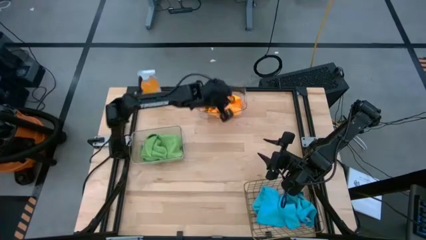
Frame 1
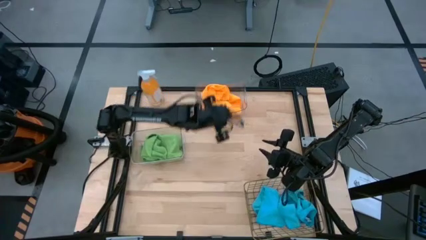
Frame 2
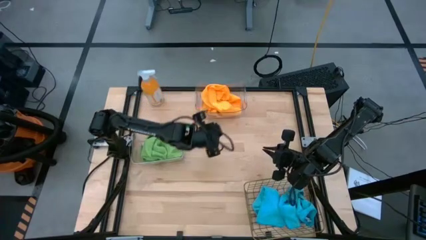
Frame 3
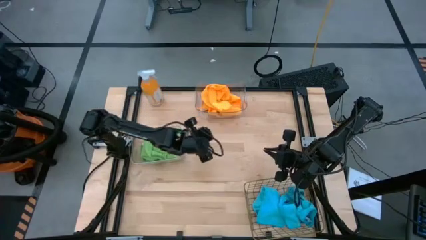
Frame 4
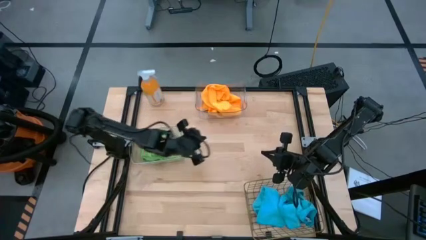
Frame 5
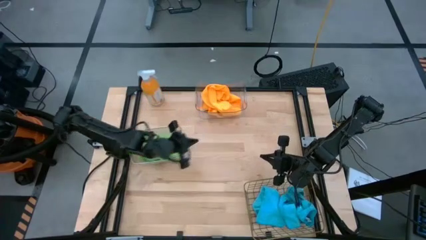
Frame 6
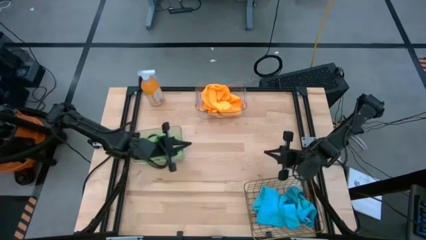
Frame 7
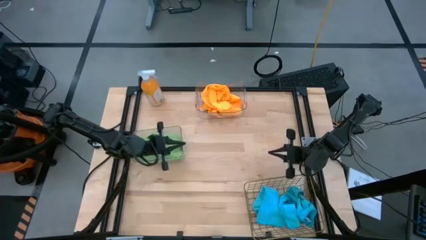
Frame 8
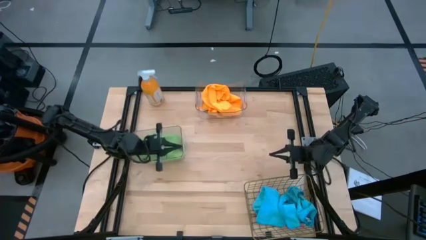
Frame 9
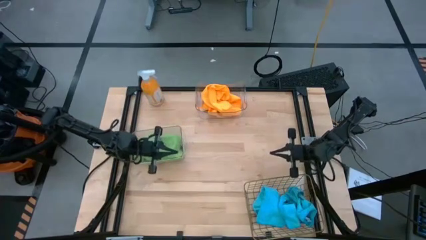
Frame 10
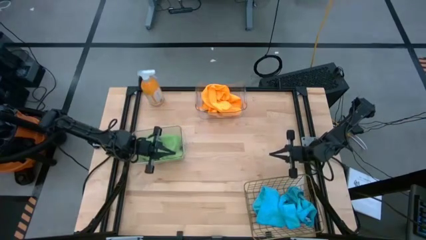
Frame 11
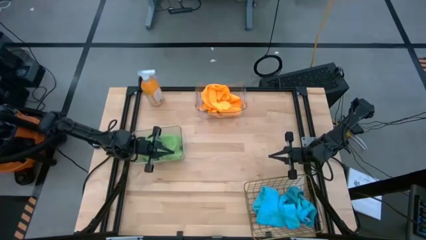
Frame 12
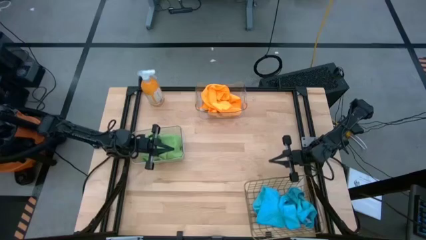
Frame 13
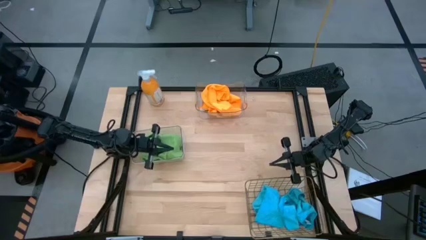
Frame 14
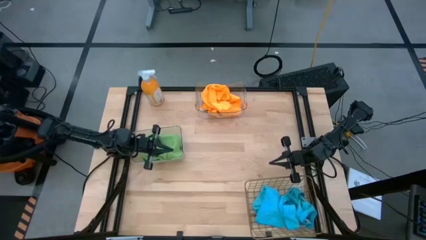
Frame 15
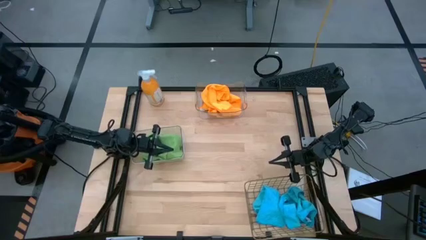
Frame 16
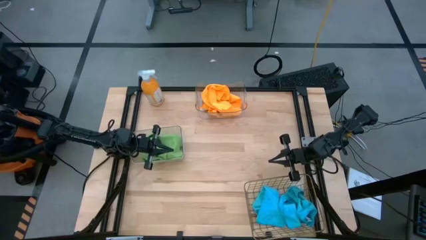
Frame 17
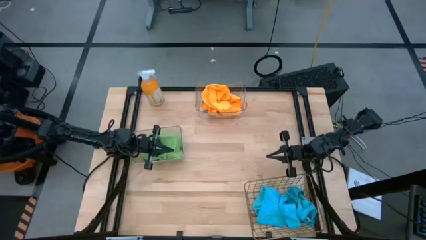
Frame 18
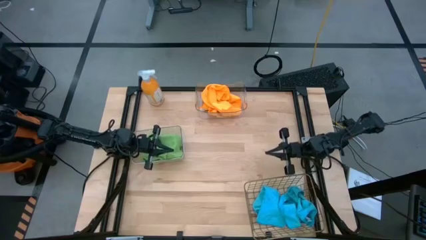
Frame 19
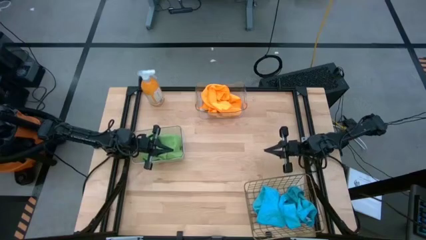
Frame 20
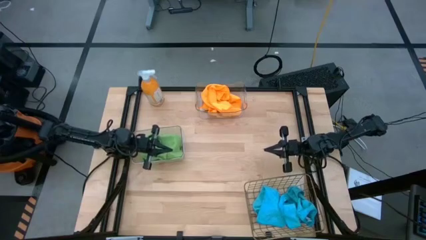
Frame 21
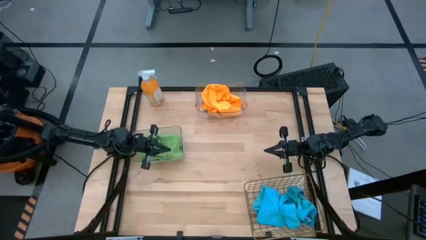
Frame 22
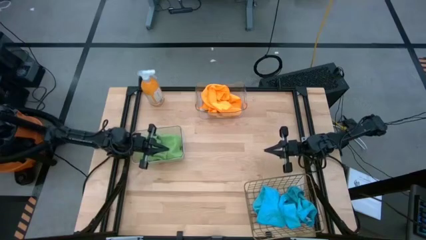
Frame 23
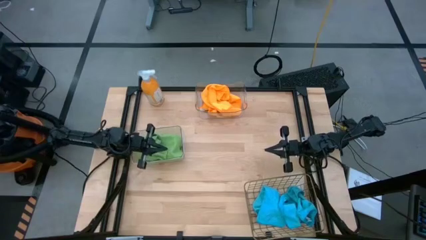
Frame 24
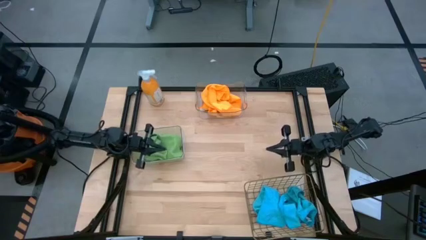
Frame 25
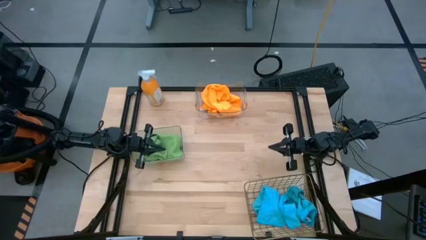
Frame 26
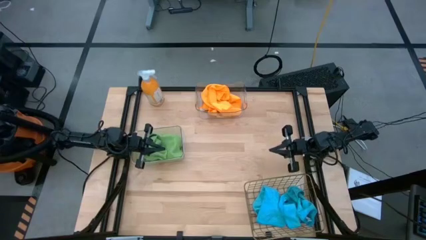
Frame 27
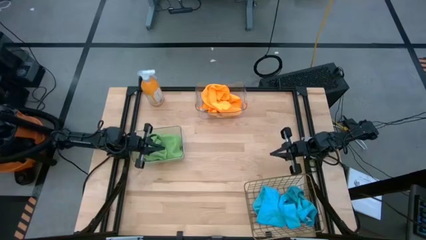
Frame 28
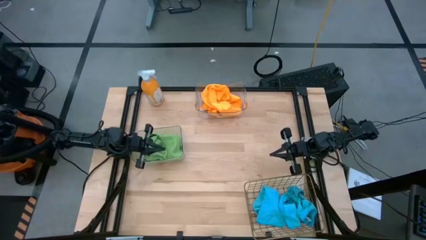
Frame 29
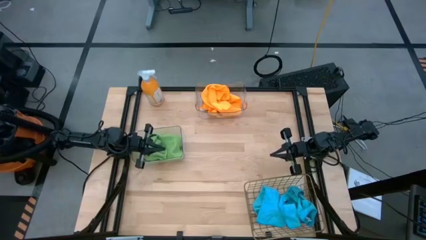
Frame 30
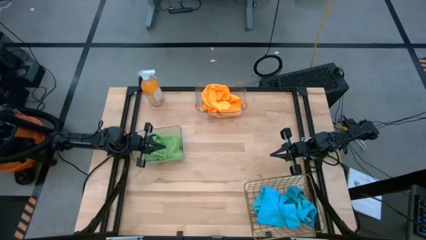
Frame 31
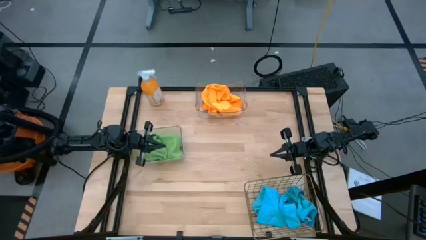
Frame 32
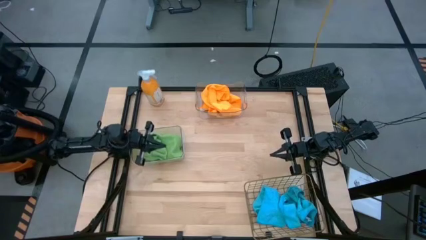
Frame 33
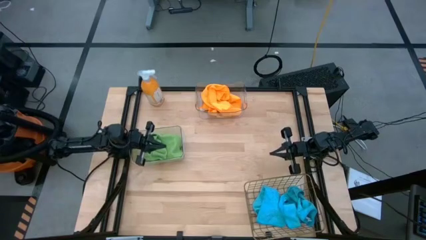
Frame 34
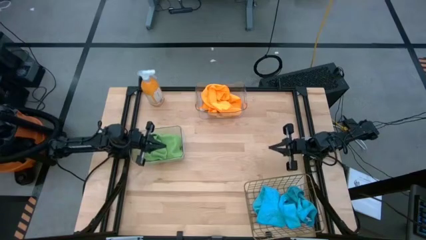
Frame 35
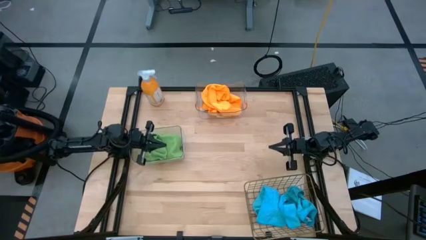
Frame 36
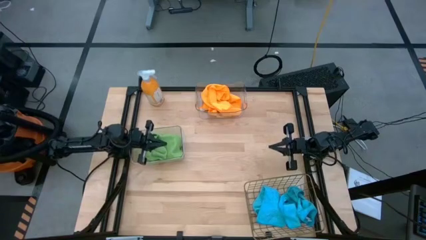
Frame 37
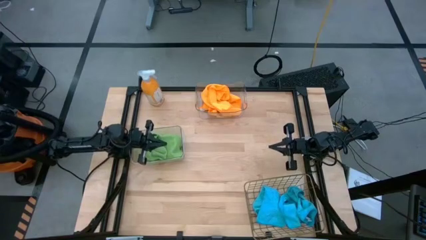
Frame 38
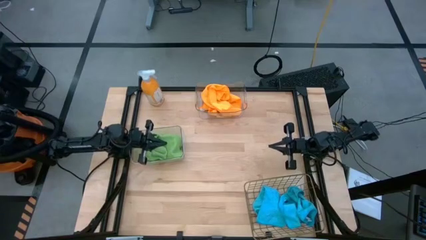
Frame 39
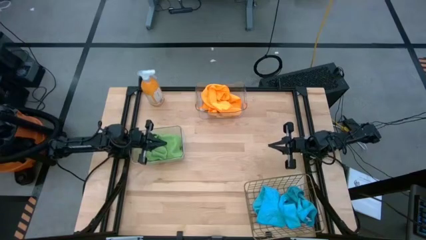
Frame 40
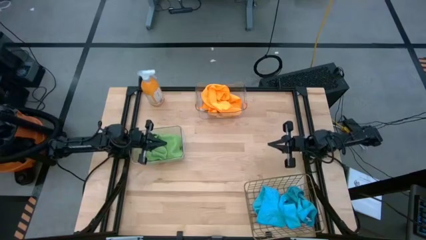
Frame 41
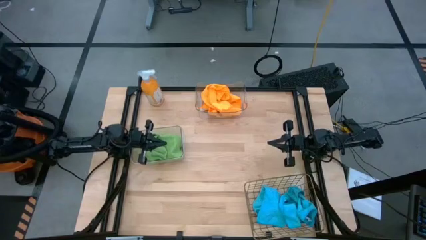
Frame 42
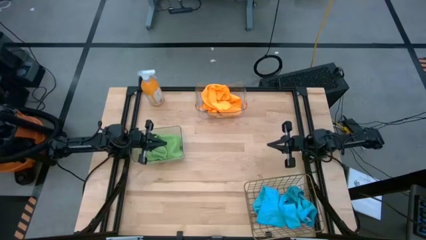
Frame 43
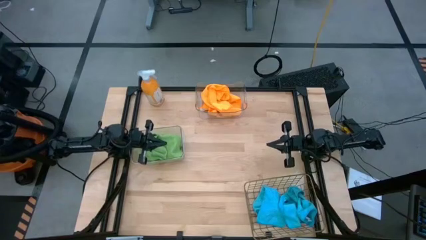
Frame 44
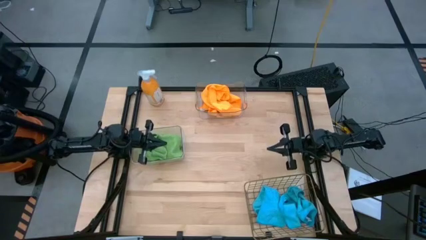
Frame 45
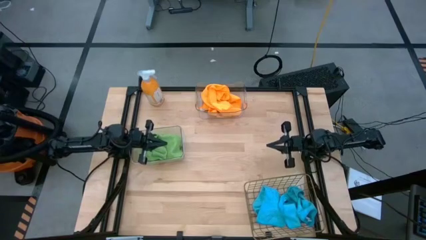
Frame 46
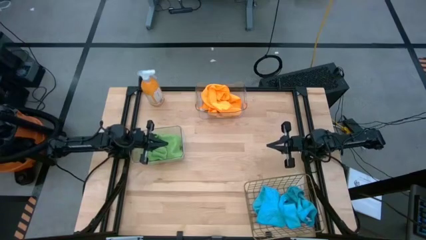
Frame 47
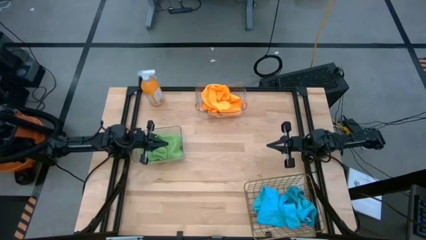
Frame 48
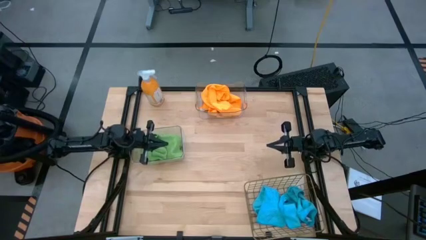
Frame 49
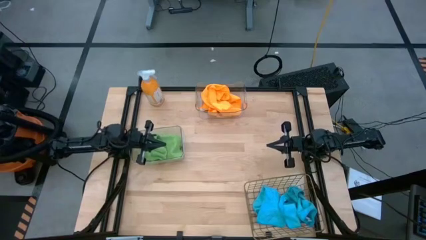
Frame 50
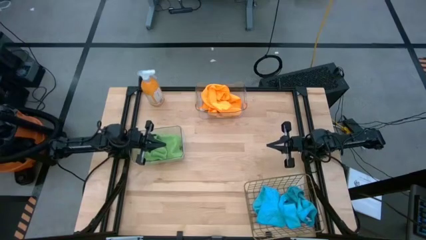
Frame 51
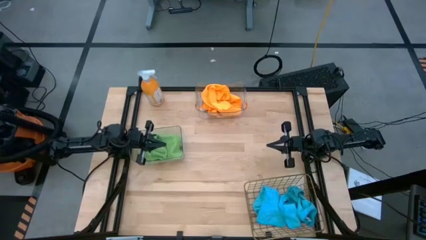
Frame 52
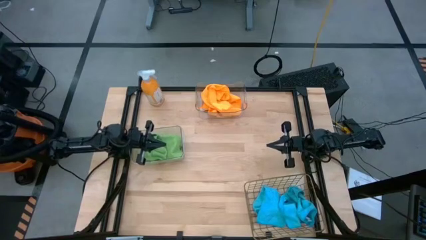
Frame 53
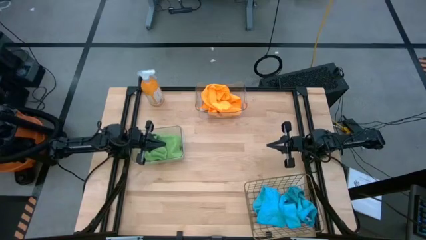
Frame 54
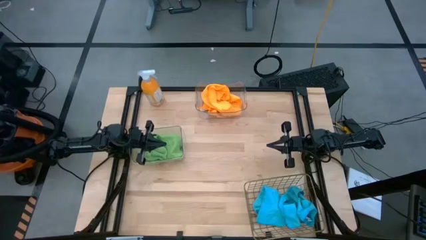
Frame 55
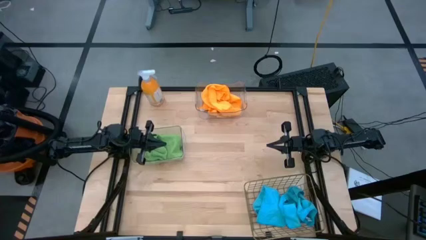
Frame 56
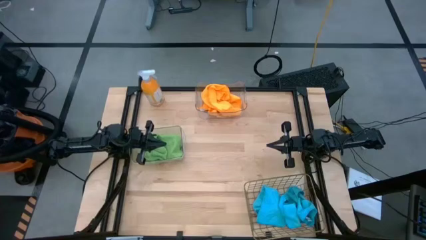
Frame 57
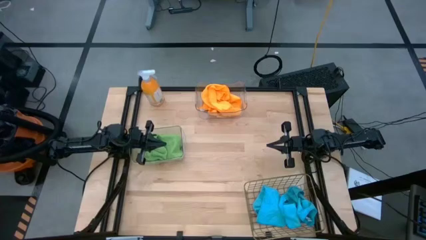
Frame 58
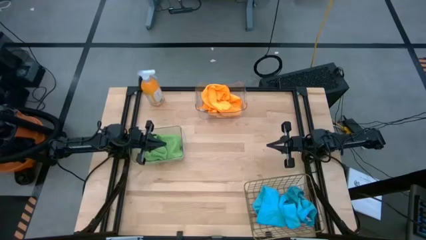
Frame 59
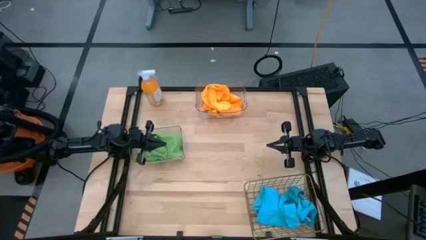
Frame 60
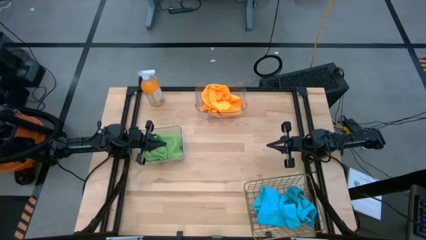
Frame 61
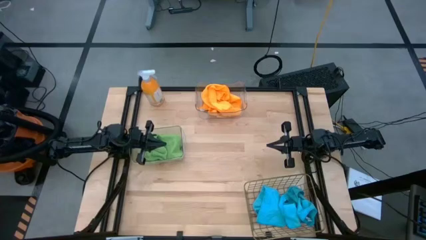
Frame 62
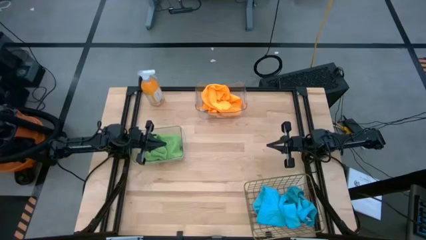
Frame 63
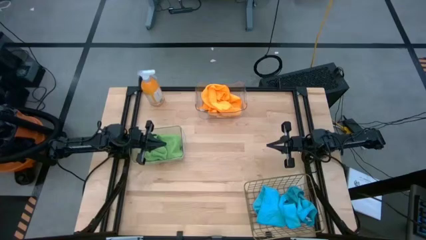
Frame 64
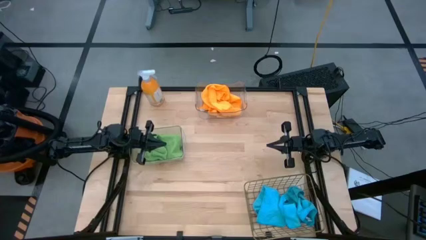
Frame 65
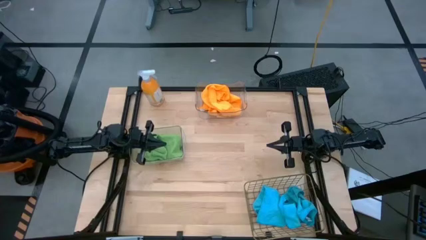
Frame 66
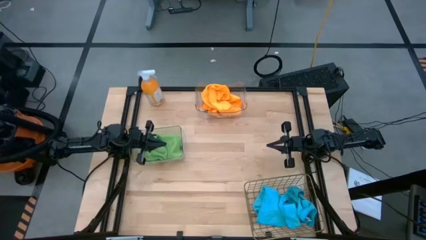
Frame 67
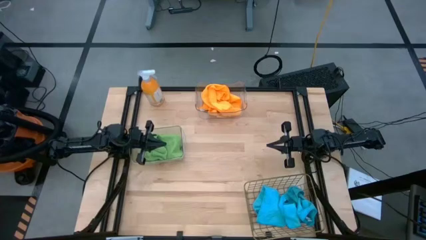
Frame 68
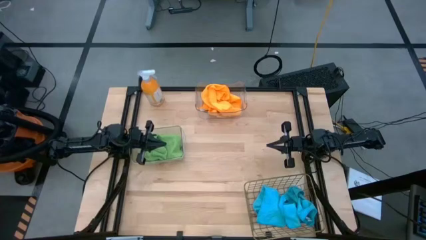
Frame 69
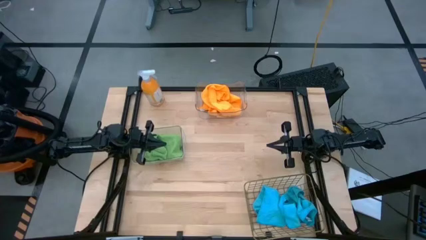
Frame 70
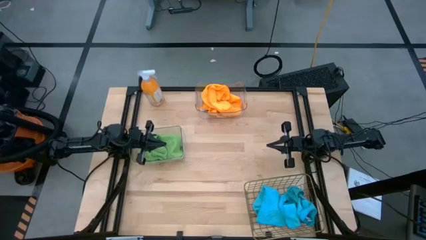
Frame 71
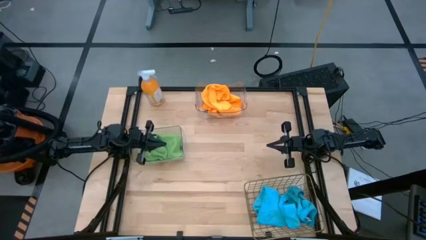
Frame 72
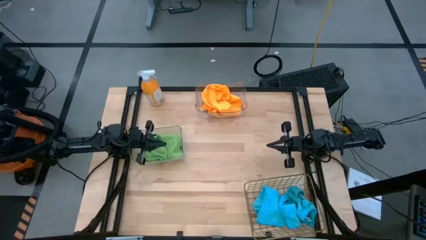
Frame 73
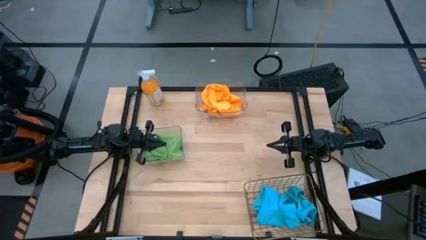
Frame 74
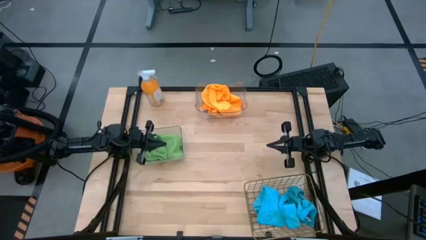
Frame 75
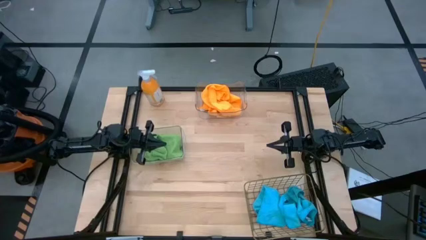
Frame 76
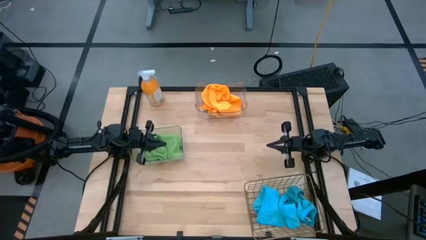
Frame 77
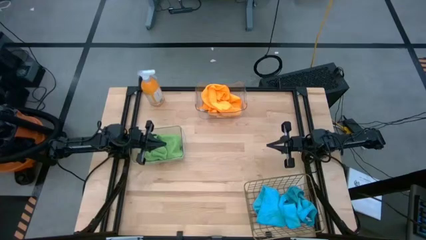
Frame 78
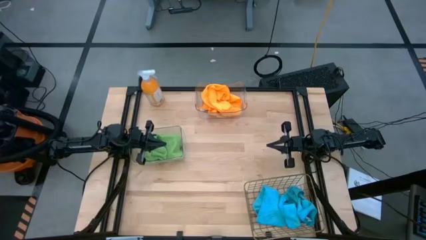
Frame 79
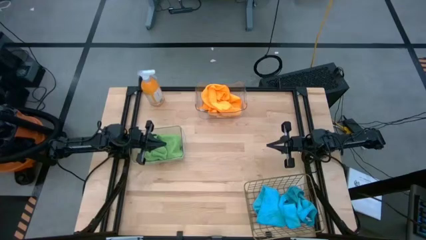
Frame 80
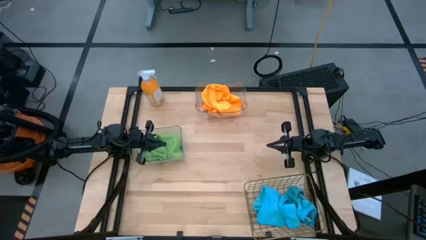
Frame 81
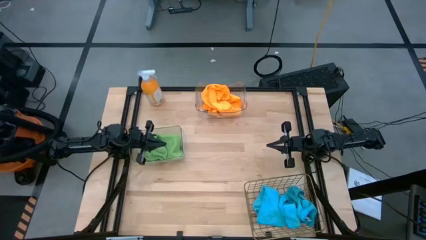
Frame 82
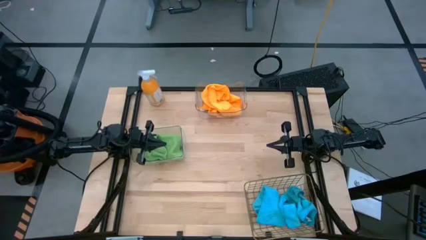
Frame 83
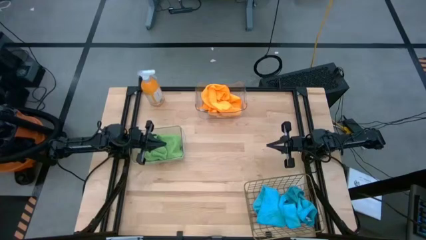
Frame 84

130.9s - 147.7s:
Task: Sort microfiber towel by color & place in baskets
Return to Home Position

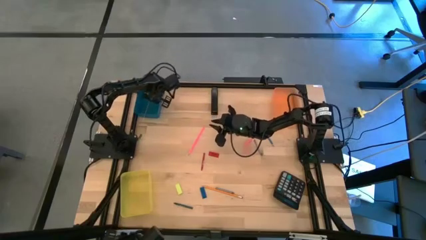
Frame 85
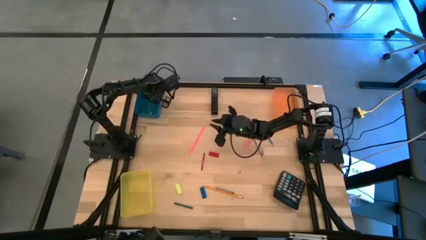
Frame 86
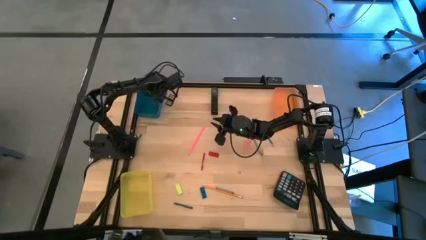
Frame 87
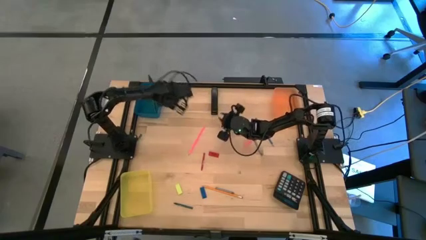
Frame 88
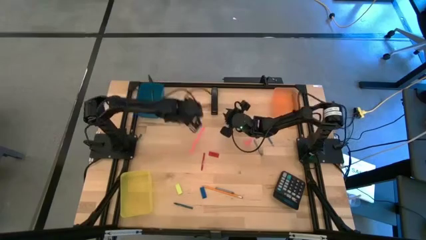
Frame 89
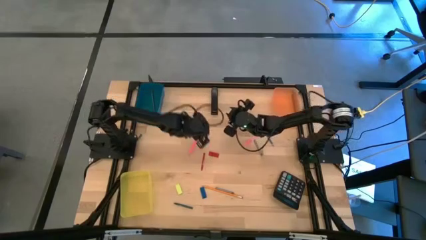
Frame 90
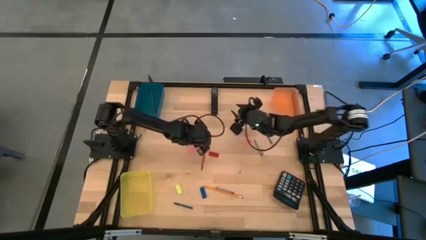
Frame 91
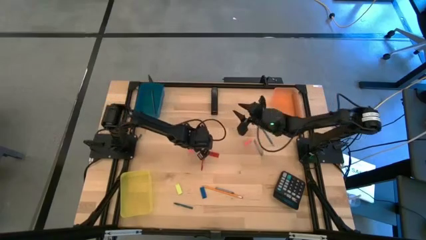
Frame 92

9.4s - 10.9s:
Task: Sort crayons/erasers/pens/pencils in bins
Put the pink pencil into the blue bin
